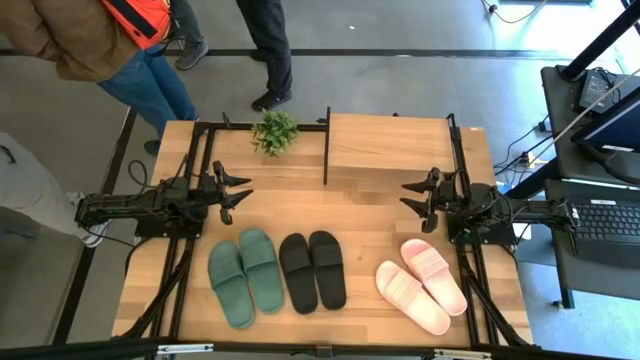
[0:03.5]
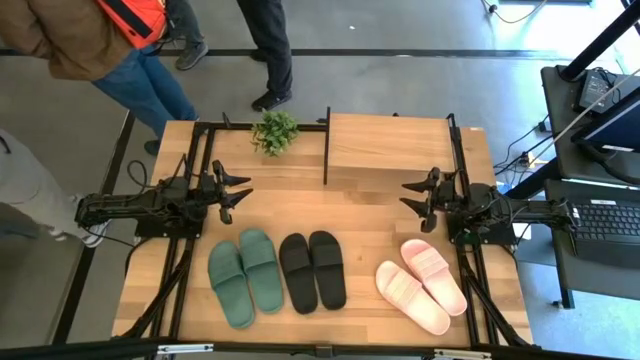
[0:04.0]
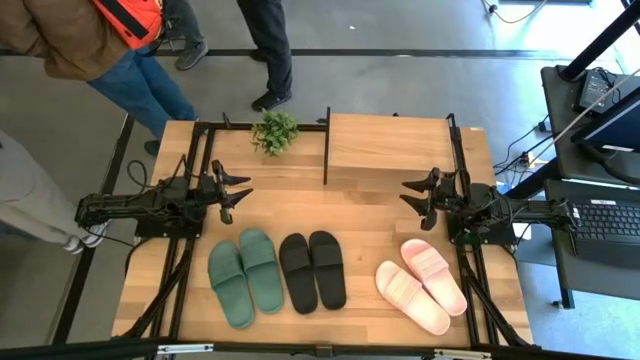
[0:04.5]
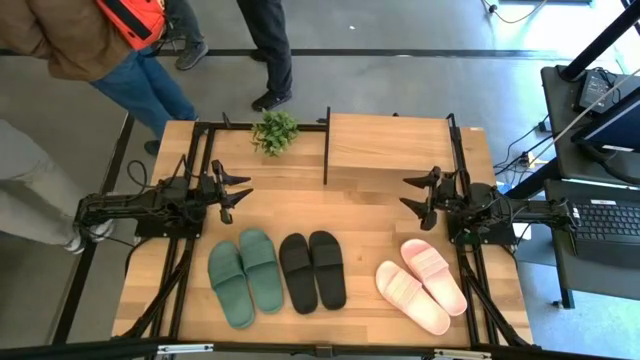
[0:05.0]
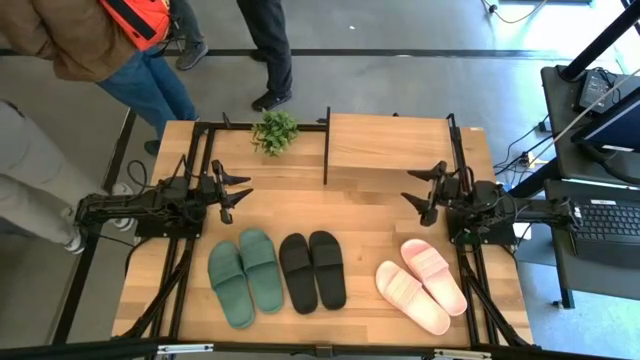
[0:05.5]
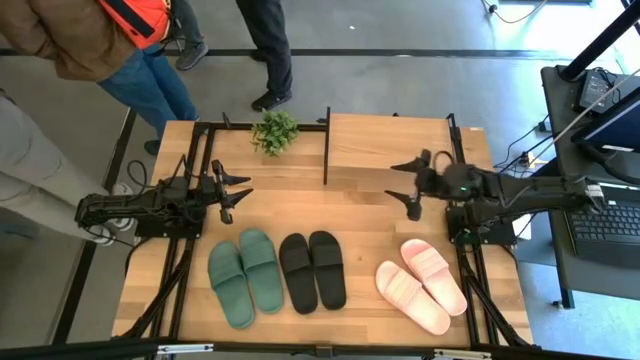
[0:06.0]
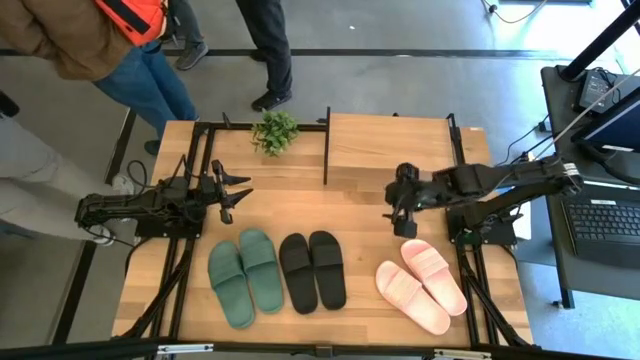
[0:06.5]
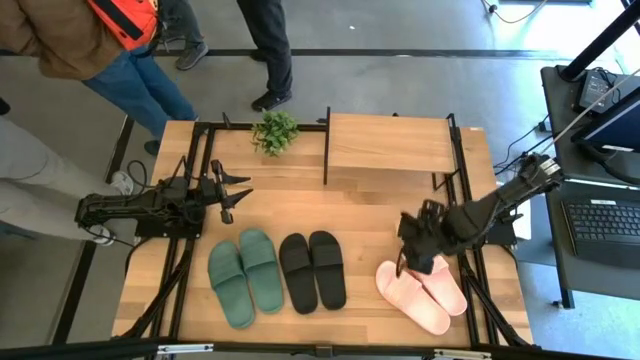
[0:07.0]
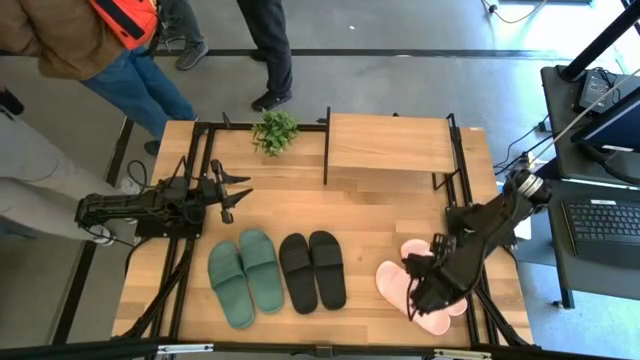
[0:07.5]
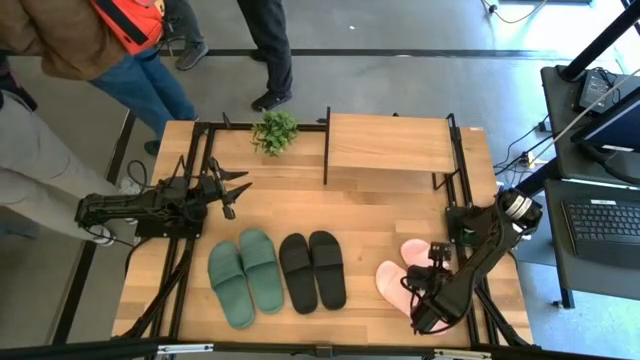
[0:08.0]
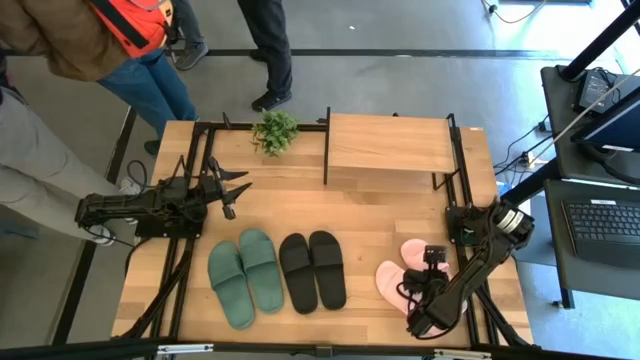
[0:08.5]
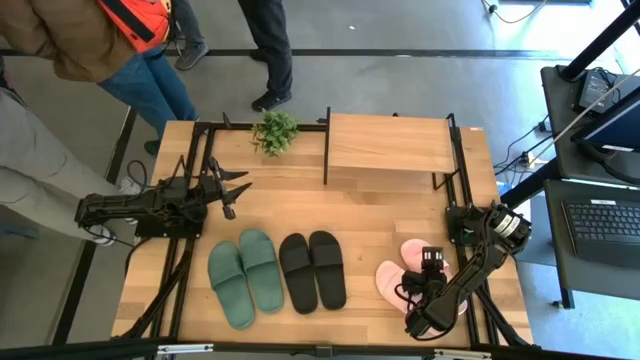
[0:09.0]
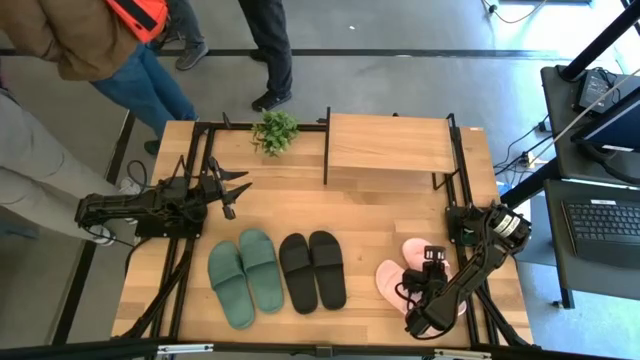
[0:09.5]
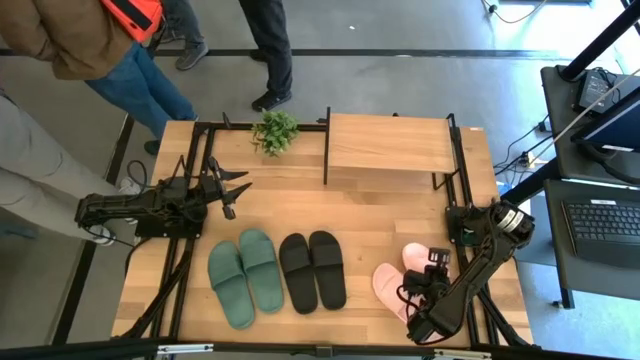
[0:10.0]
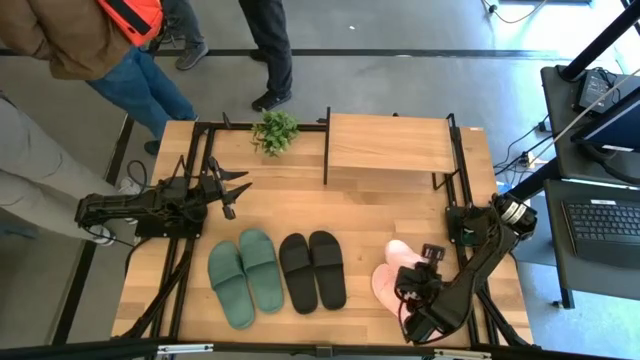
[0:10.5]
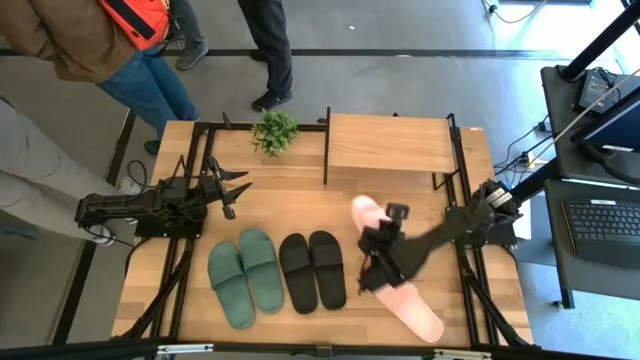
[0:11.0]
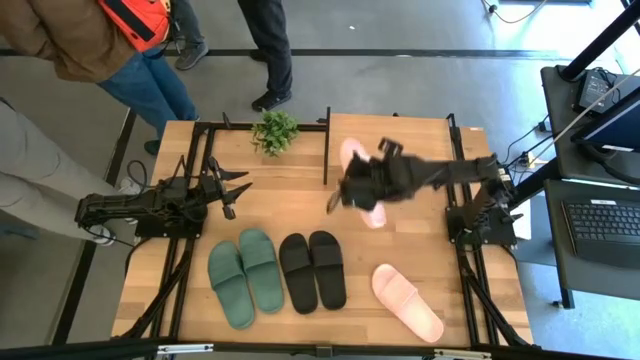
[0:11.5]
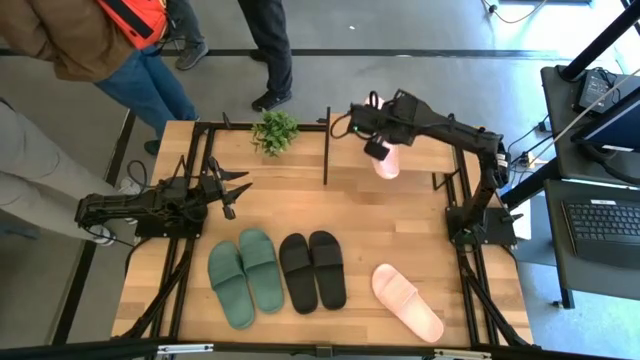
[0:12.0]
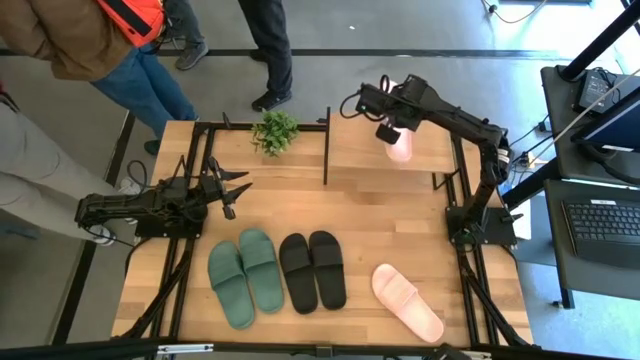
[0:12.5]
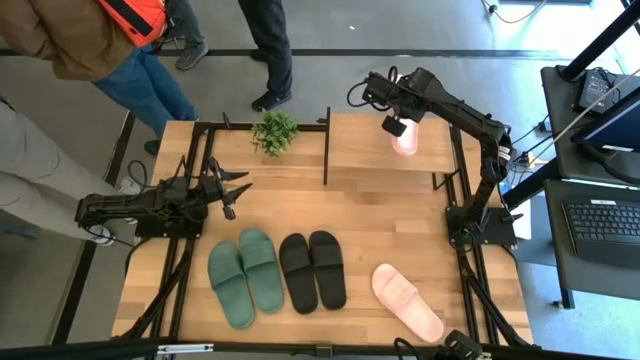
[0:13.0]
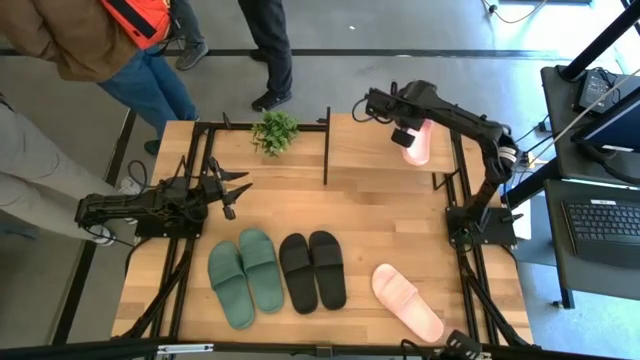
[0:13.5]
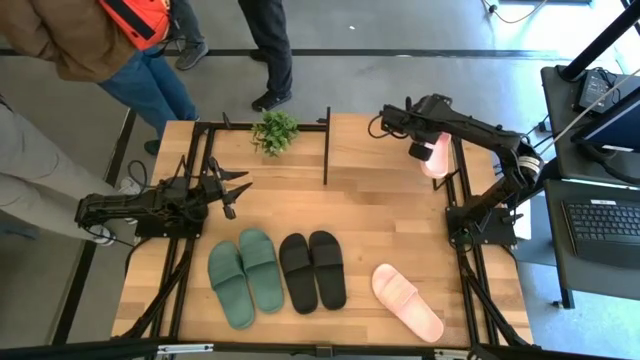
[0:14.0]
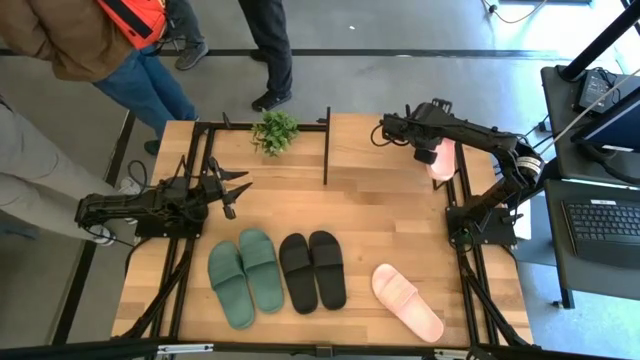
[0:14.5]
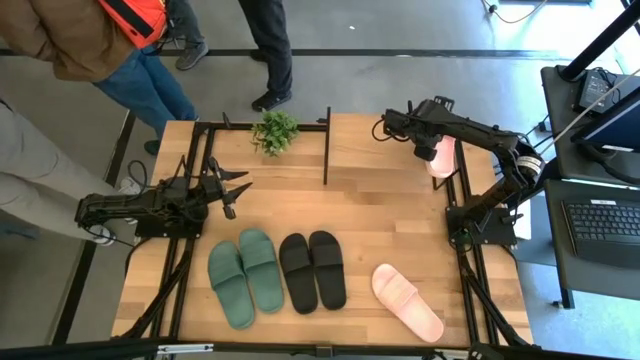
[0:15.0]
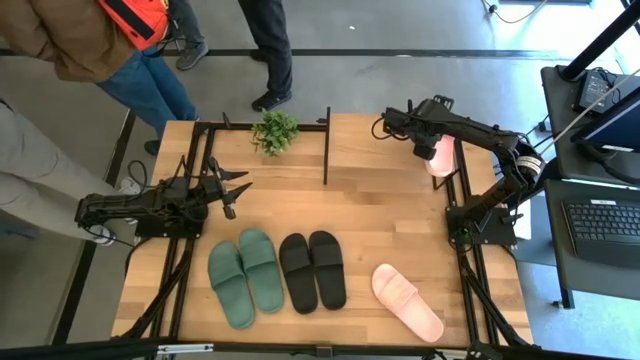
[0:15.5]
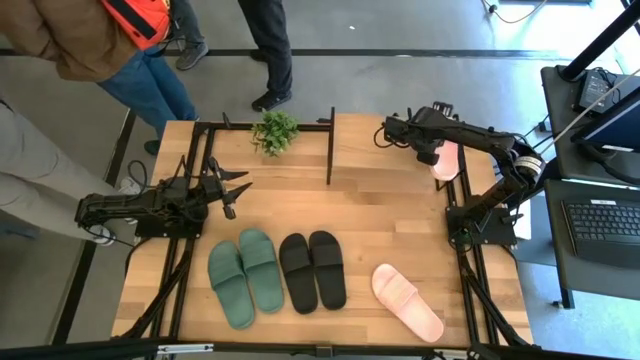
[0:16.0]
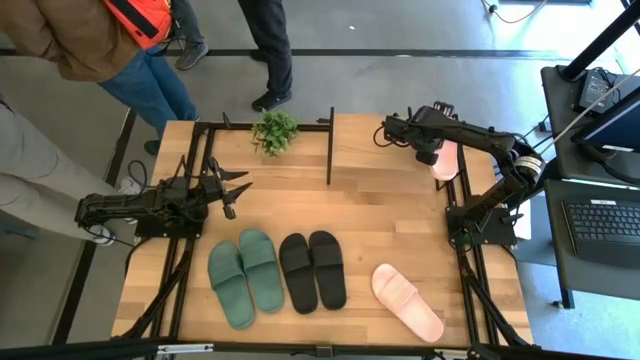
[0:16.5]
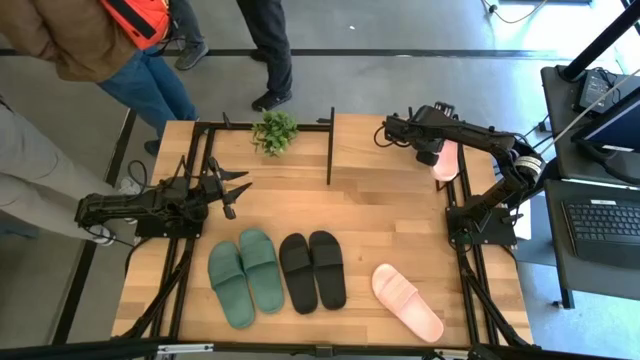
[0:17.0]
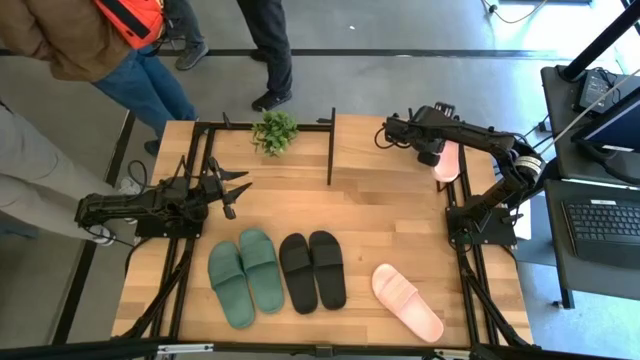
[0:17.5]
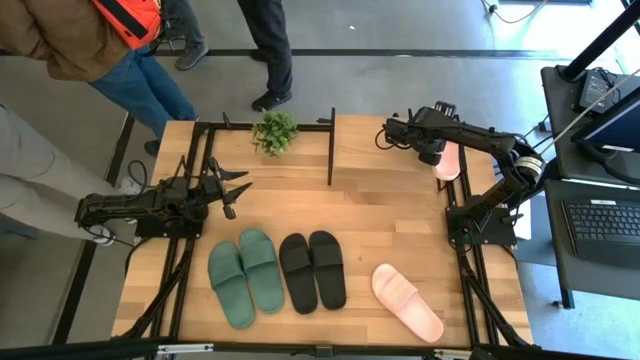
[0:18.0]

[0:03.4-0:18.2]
Task: Pick and place slides into the shelf
Put the right pink slide on the shelf

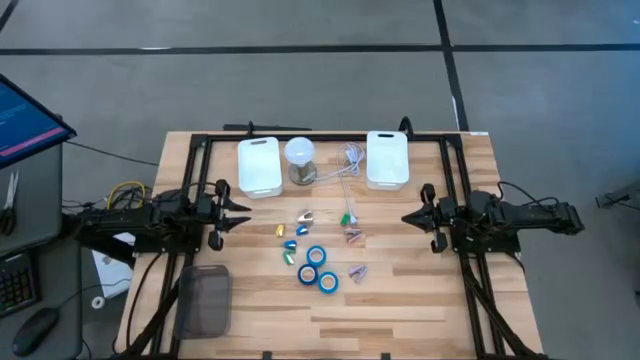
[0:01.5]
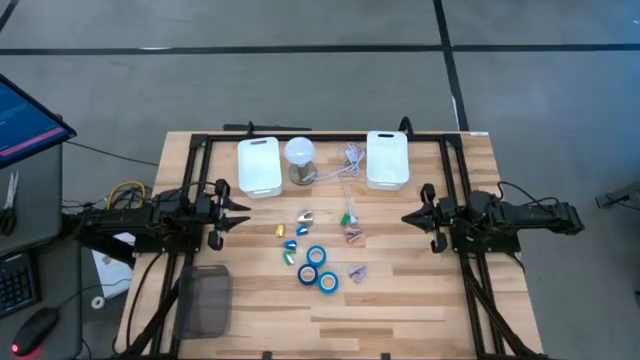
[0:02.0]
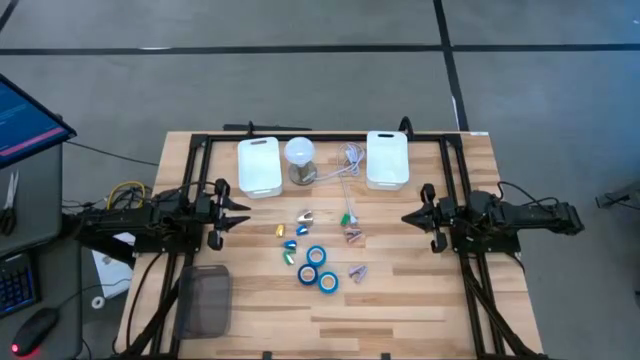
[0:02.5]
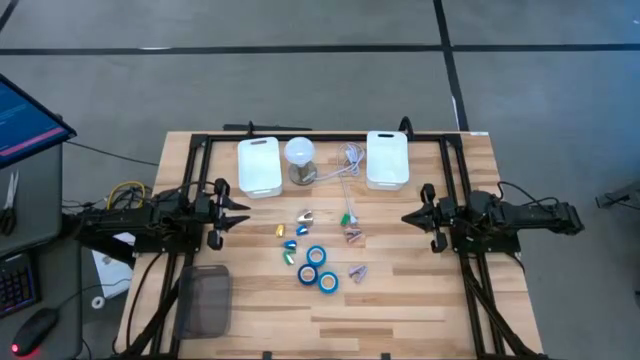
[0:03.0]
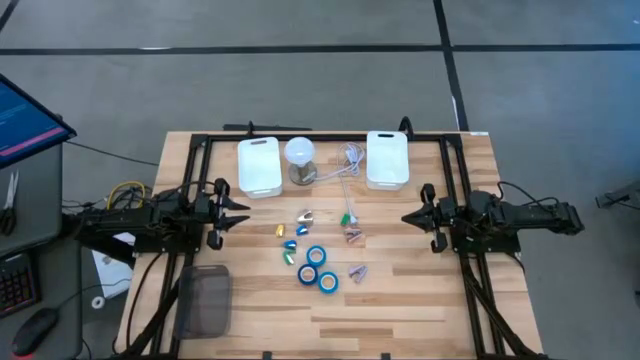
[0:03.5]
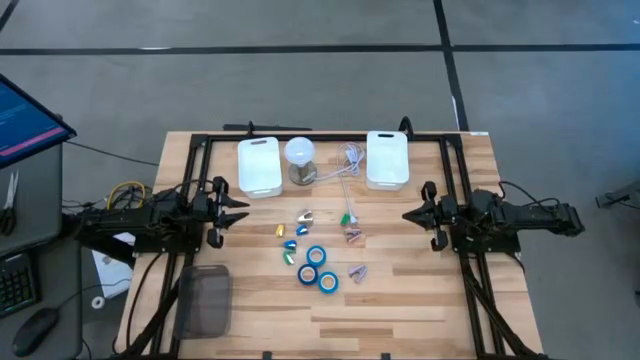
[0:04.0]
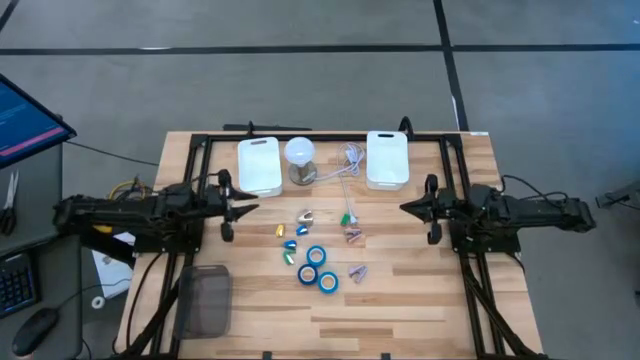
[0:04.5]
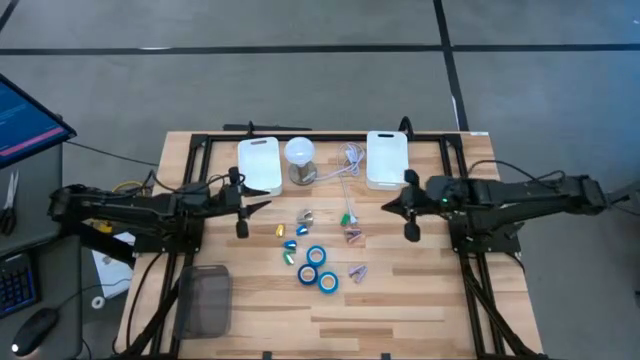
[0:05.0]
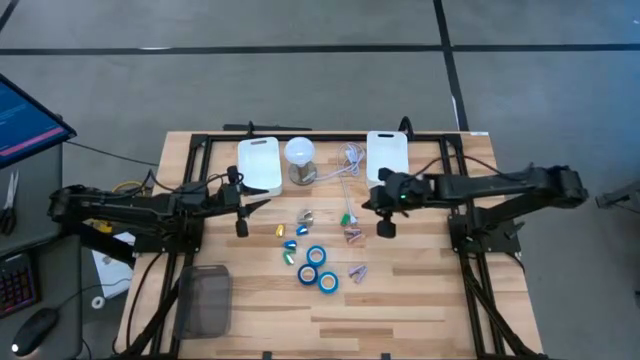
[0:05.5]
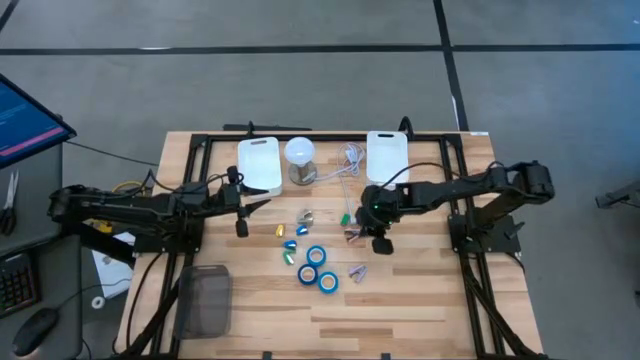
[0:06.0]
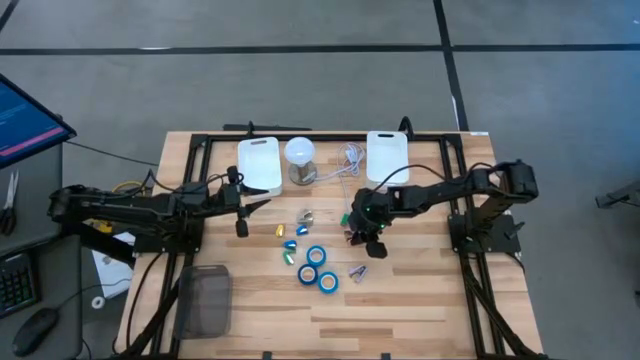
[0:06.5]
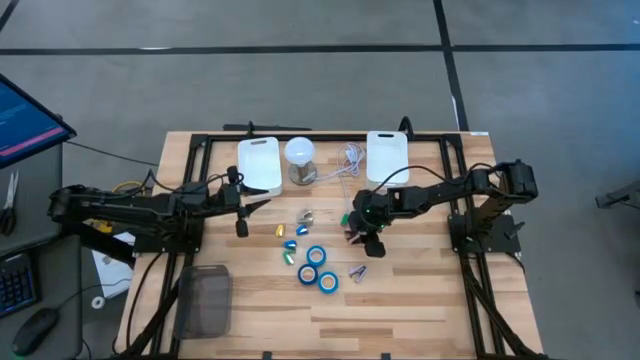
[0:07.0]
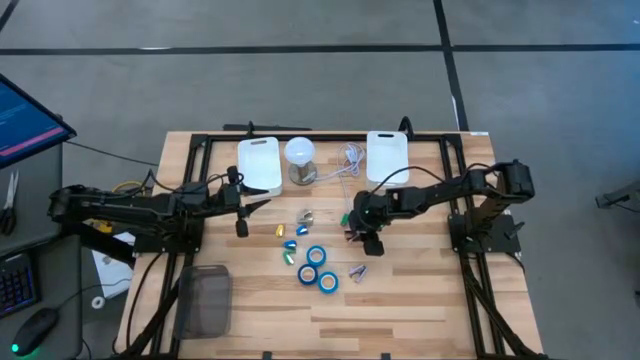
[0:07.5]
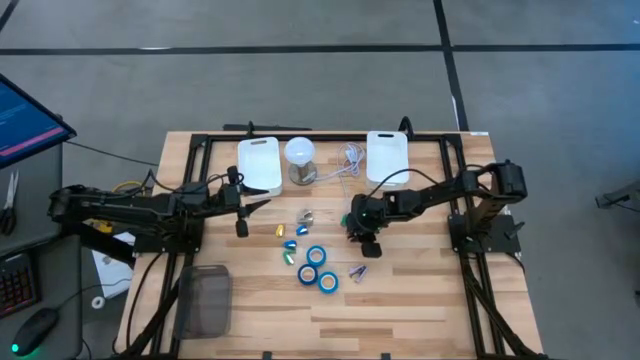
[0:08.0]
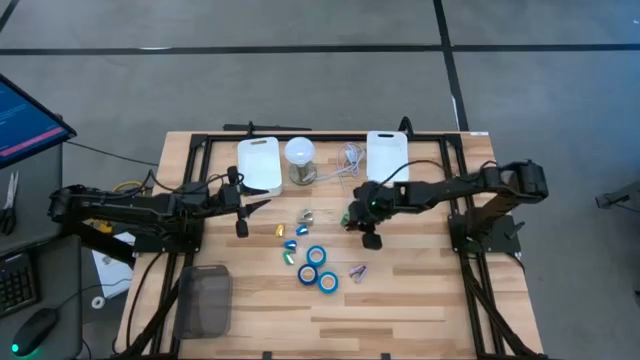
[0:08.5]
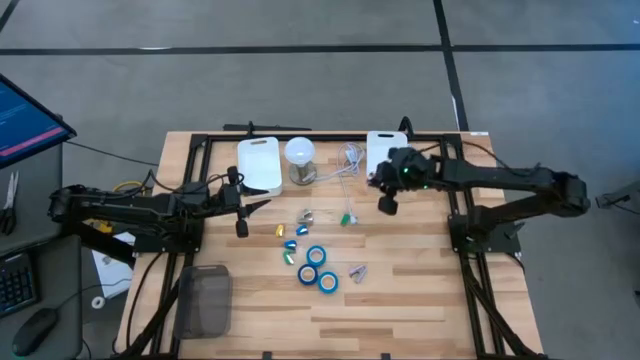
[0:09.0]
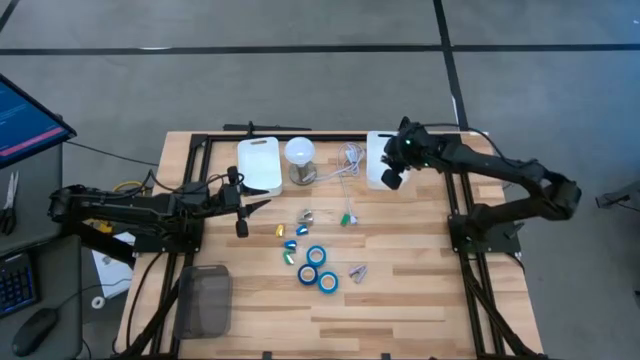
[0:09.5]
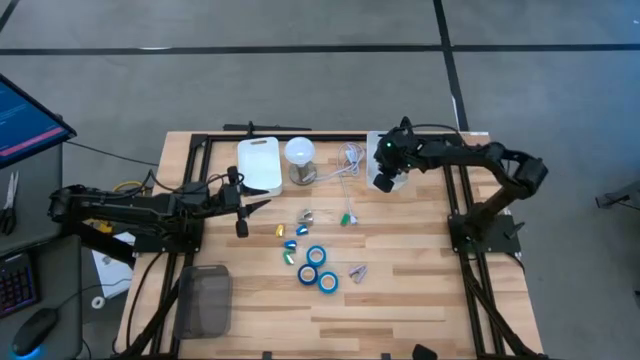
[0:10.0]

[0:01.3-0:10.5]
Task: Pick and place Stapler, Stapler remover, tape
Put the pink staple remover into the right white bin
